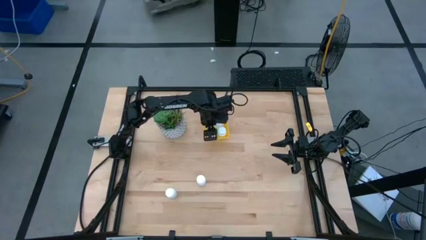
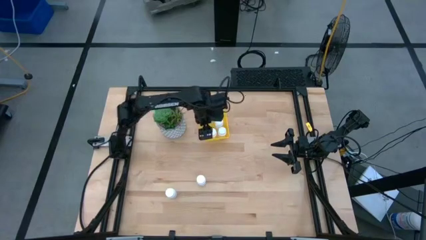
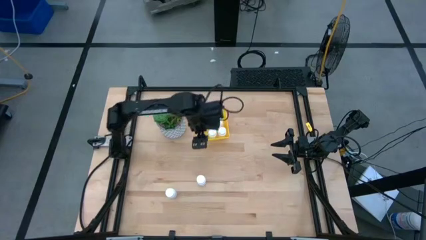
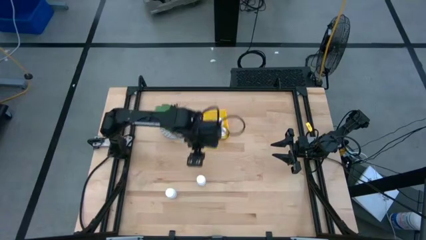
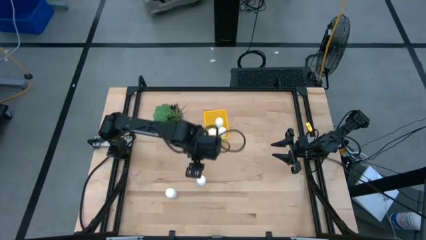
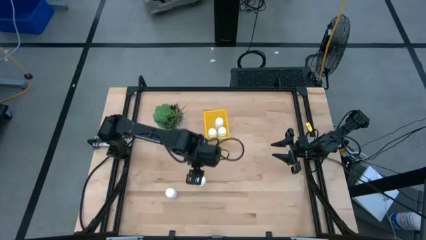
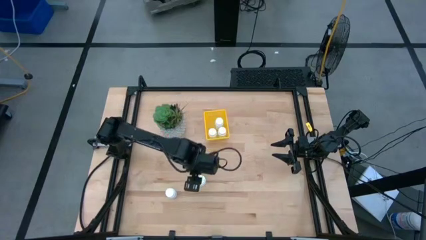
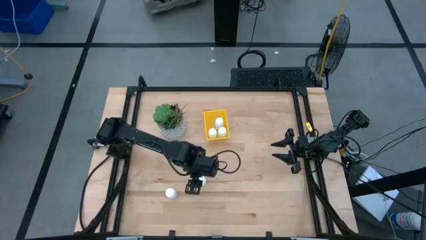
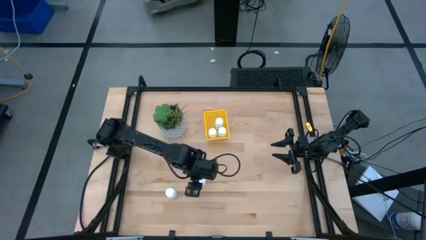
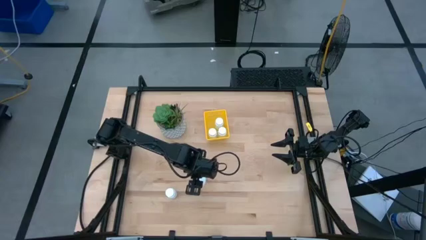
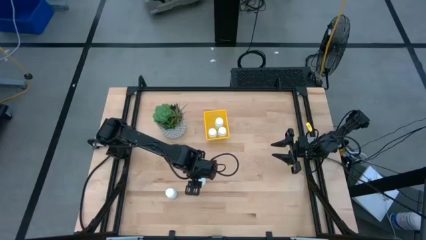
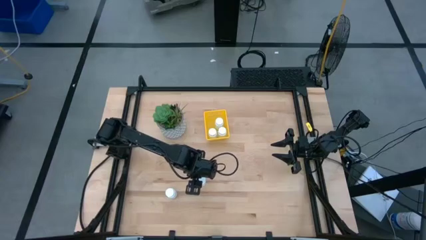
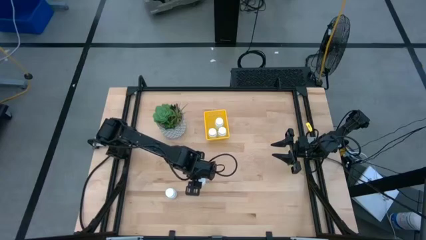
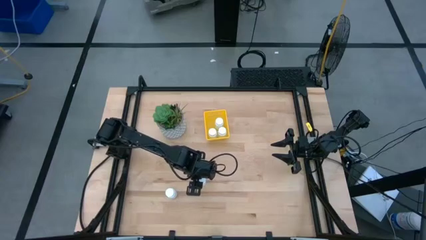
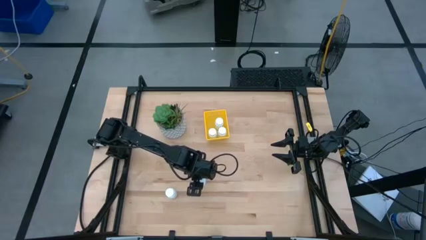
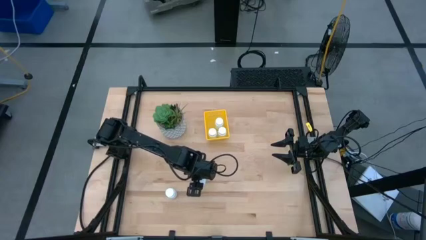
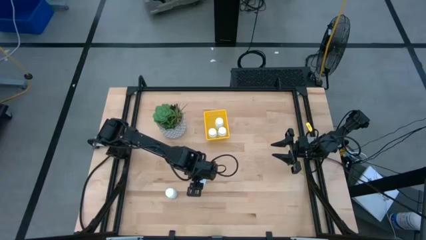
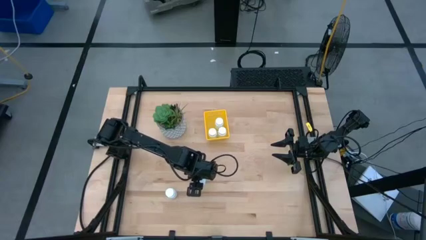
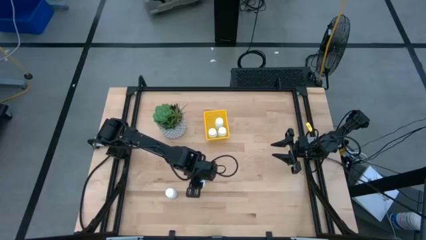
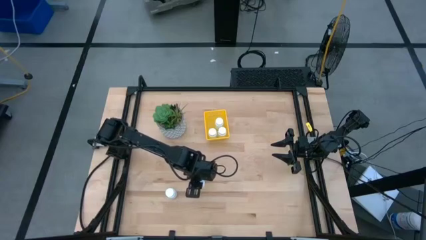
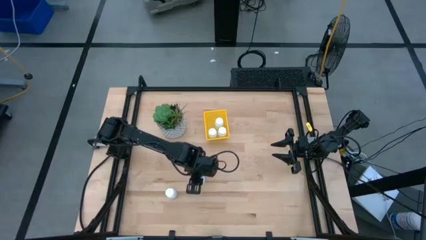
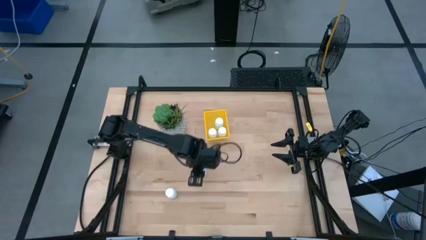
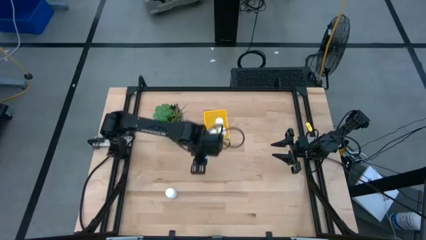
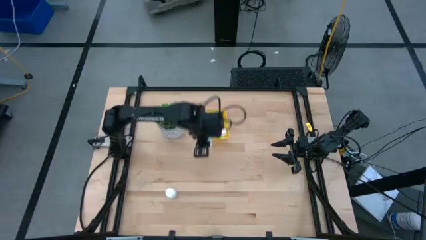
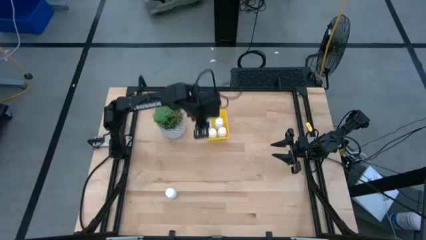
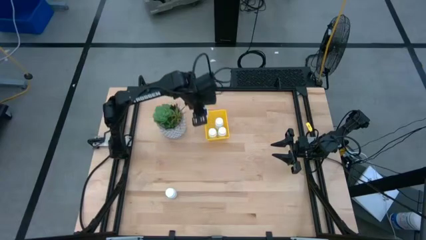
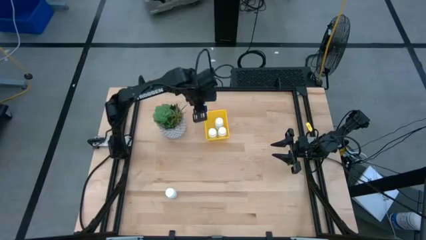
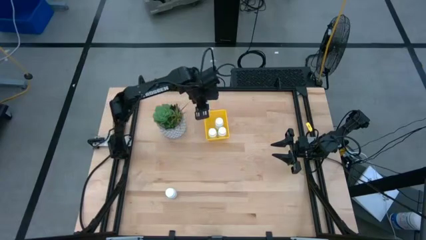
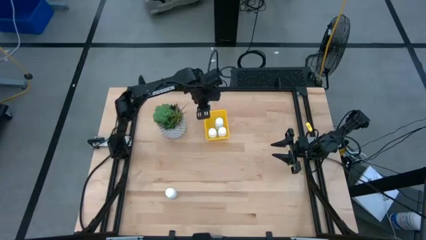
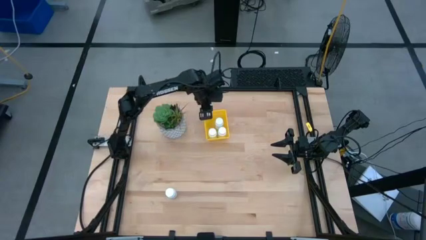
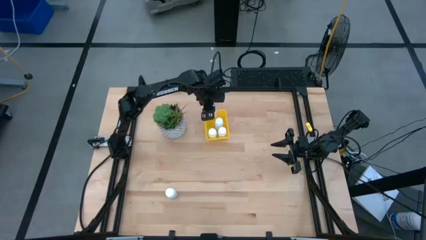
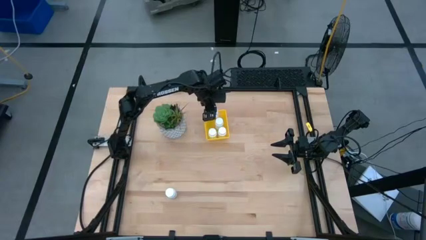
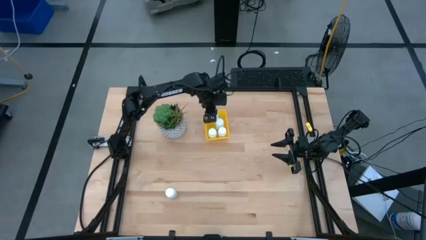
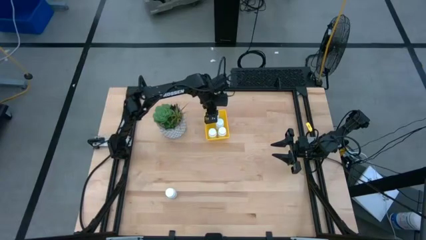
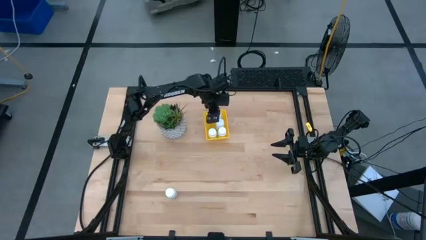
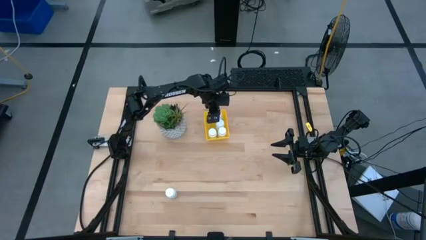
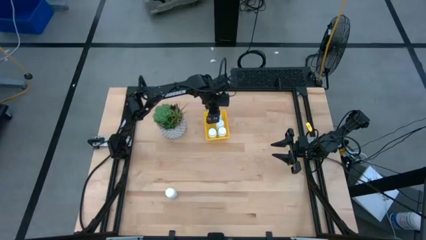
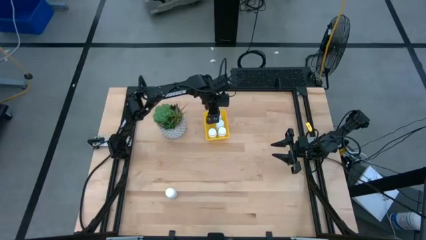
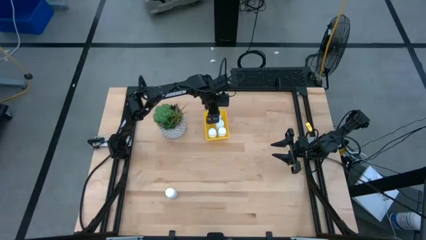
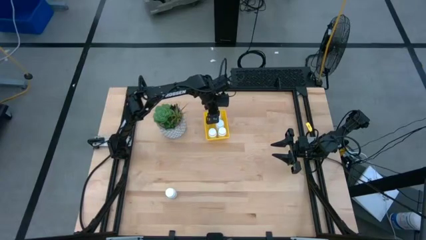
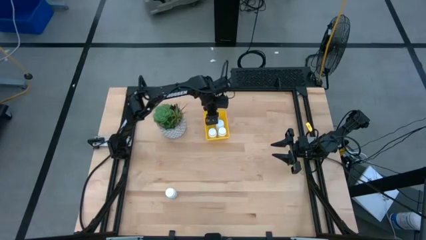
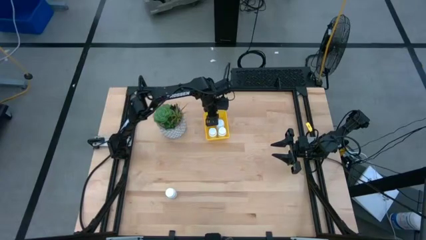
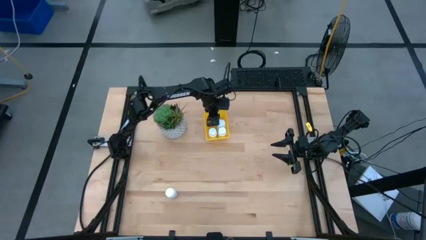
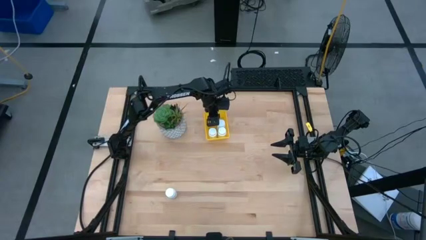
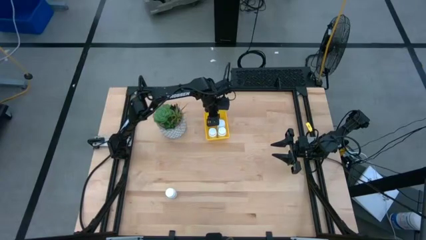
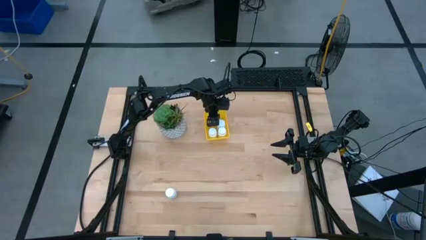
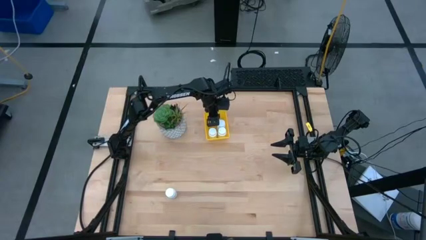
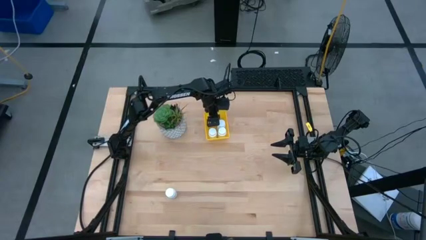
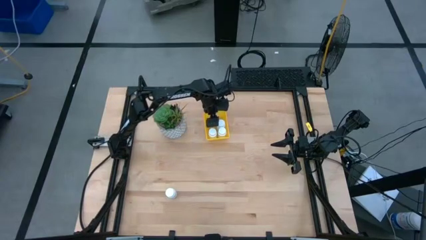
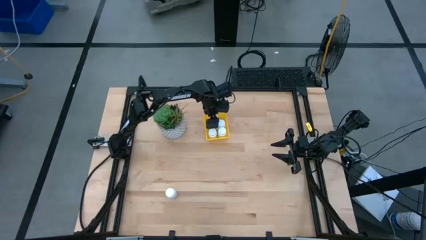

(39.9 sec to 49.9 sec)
Task: Pick and place pill bottles into a basket
Put the white pill bottle into the yellow bin
